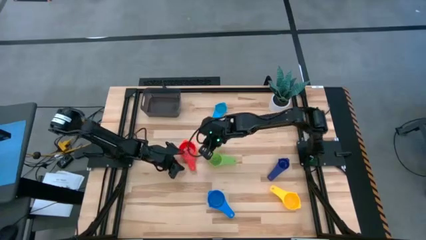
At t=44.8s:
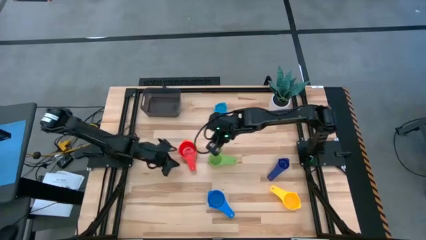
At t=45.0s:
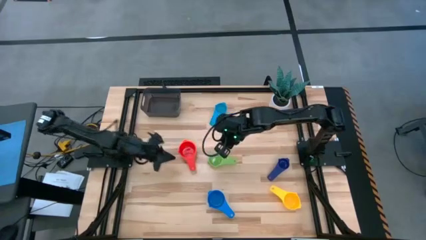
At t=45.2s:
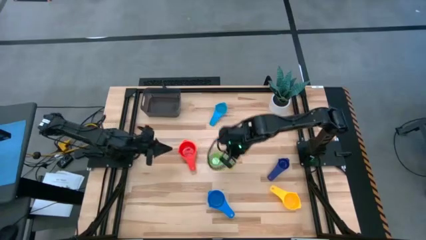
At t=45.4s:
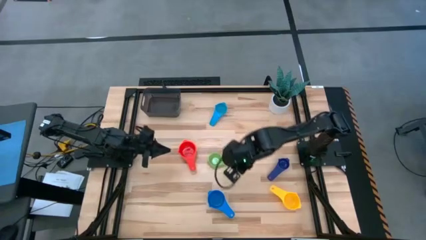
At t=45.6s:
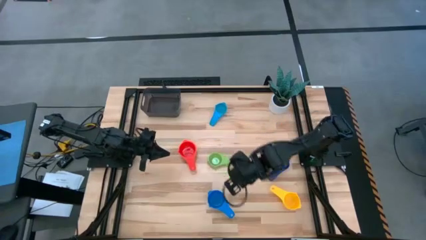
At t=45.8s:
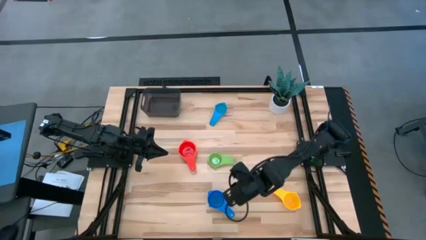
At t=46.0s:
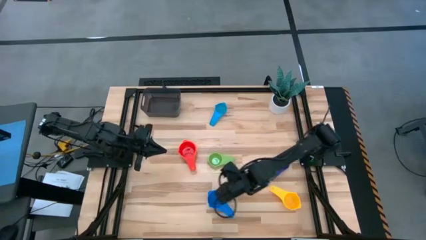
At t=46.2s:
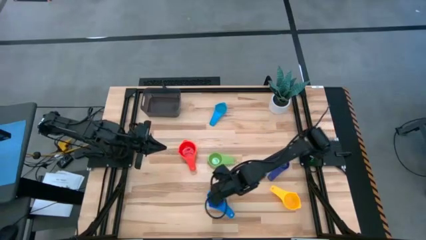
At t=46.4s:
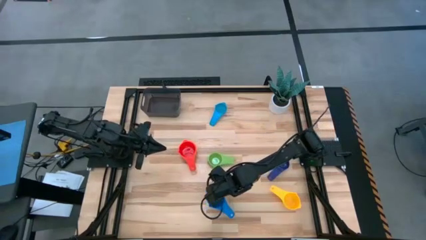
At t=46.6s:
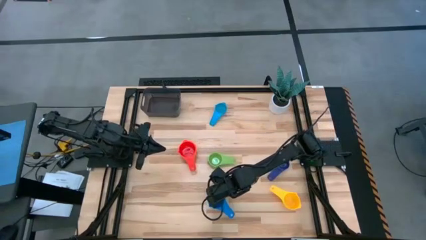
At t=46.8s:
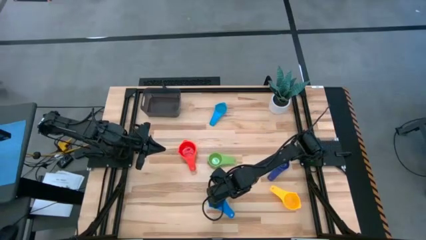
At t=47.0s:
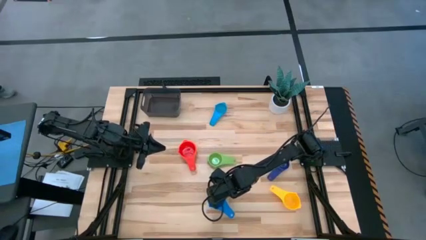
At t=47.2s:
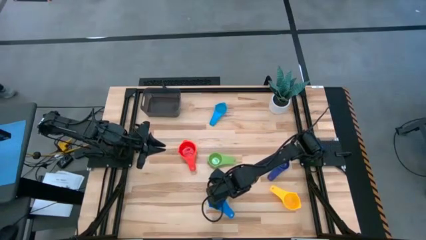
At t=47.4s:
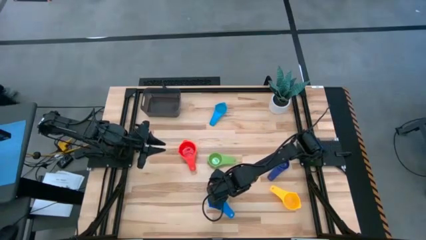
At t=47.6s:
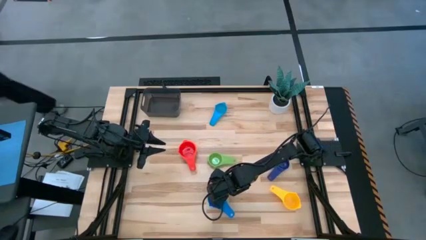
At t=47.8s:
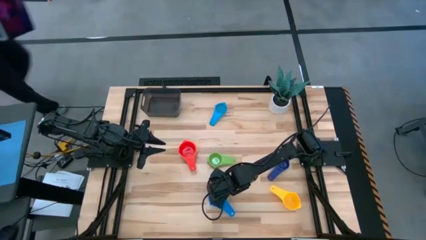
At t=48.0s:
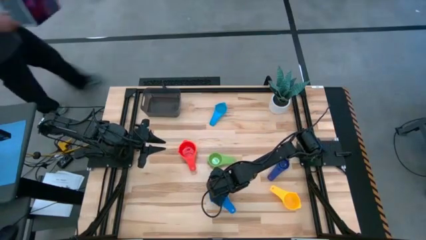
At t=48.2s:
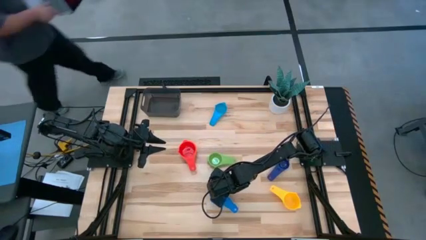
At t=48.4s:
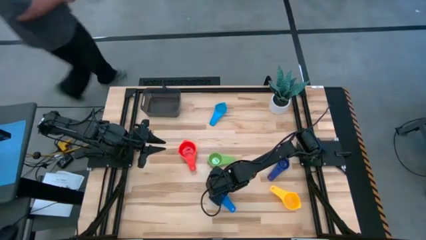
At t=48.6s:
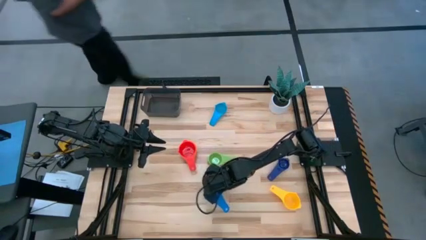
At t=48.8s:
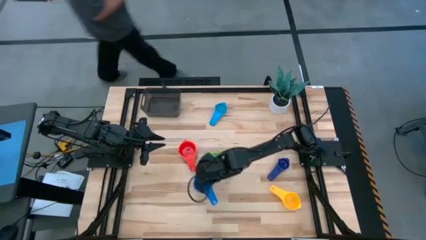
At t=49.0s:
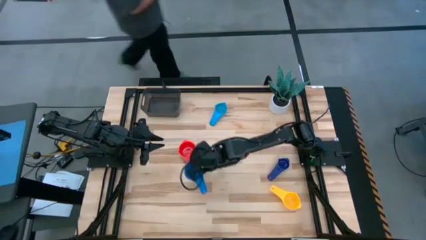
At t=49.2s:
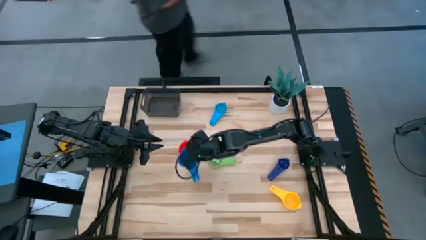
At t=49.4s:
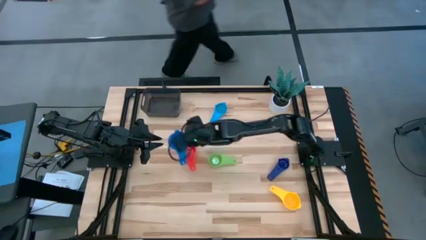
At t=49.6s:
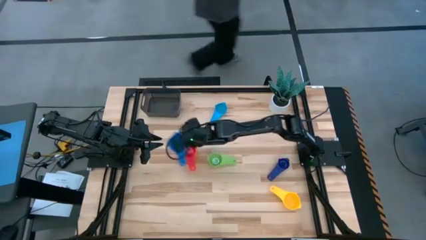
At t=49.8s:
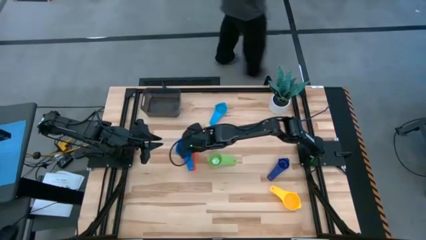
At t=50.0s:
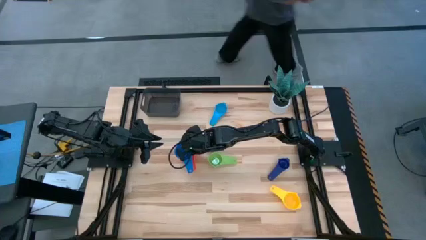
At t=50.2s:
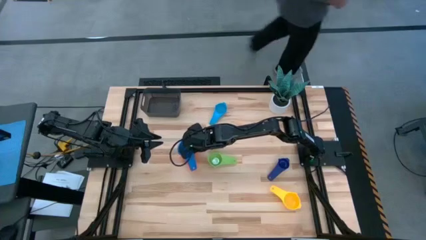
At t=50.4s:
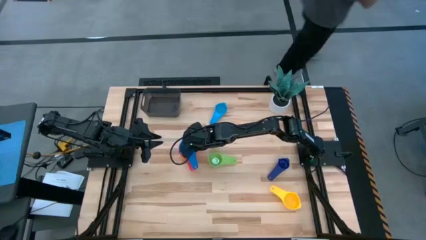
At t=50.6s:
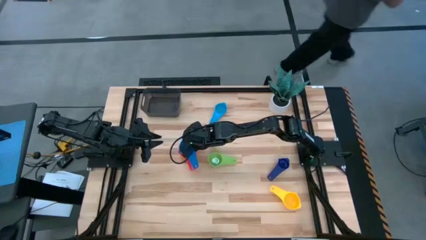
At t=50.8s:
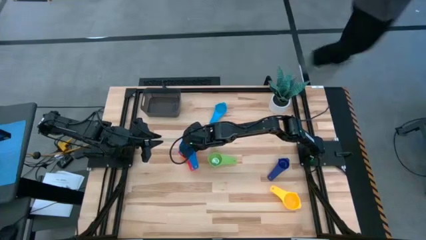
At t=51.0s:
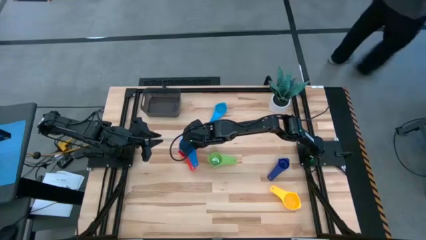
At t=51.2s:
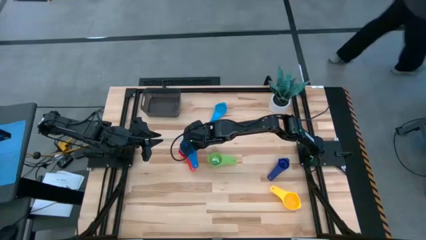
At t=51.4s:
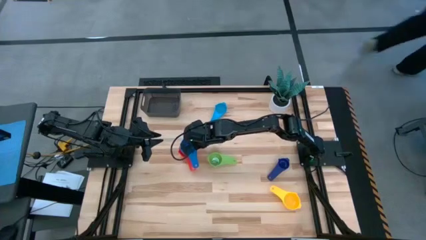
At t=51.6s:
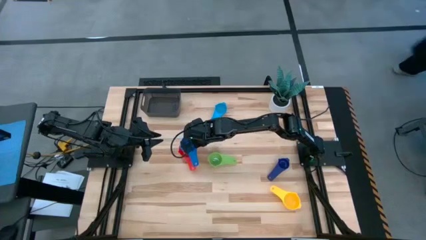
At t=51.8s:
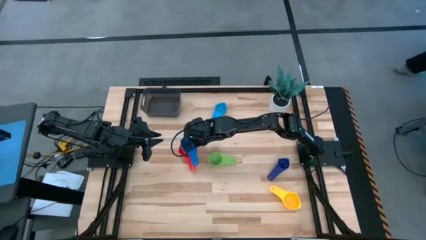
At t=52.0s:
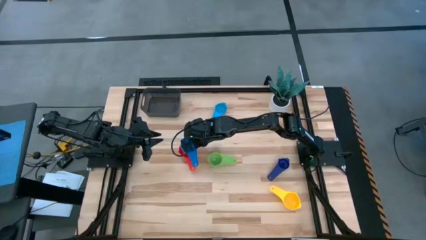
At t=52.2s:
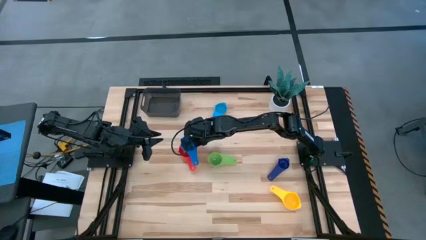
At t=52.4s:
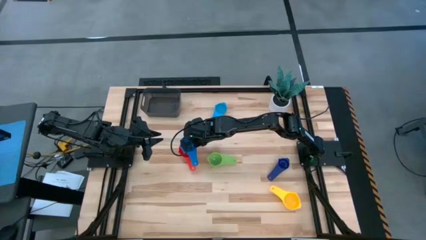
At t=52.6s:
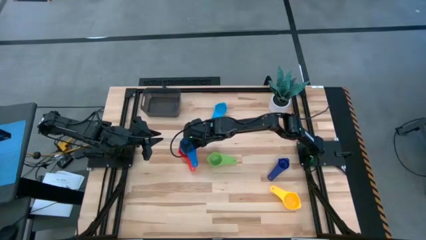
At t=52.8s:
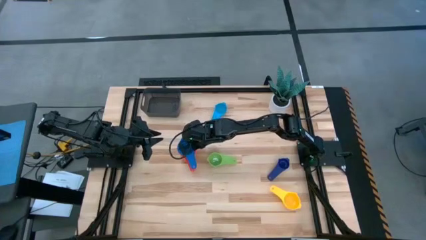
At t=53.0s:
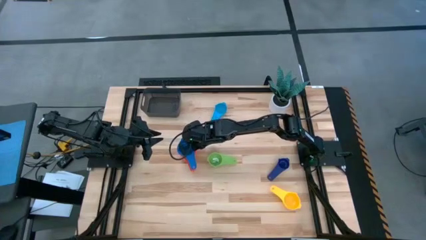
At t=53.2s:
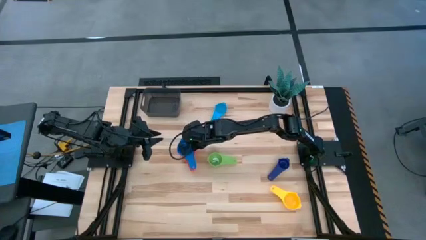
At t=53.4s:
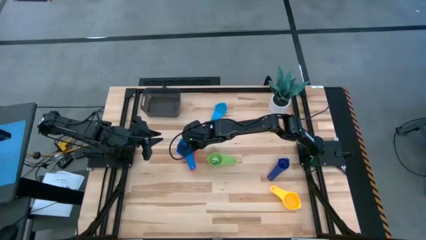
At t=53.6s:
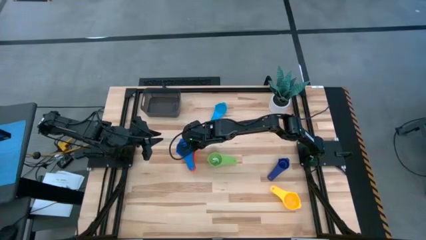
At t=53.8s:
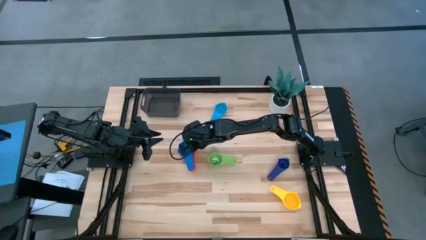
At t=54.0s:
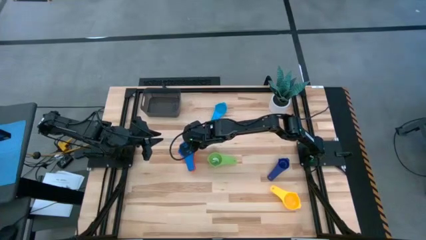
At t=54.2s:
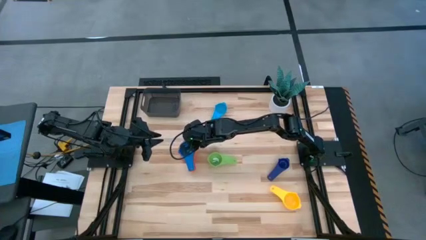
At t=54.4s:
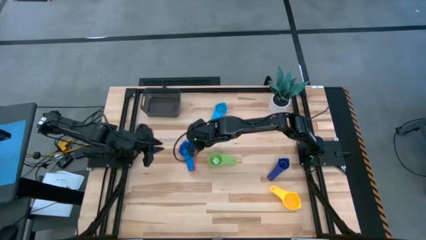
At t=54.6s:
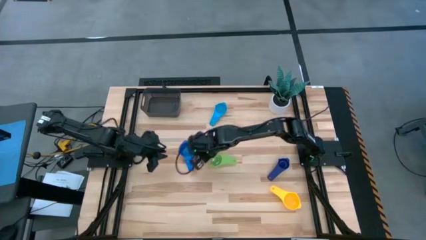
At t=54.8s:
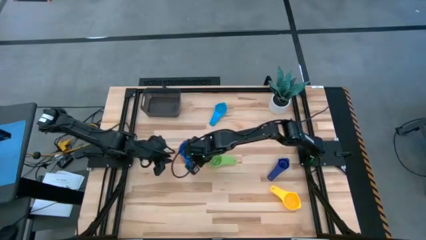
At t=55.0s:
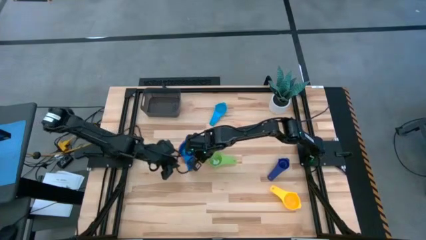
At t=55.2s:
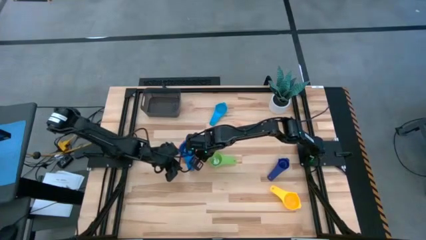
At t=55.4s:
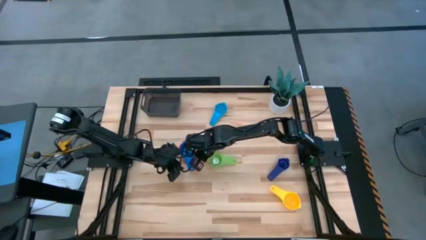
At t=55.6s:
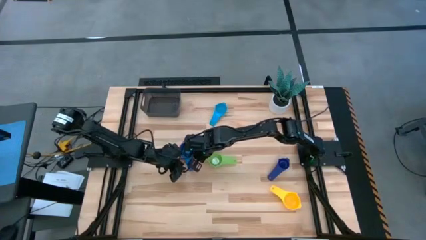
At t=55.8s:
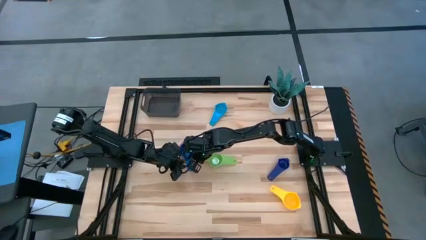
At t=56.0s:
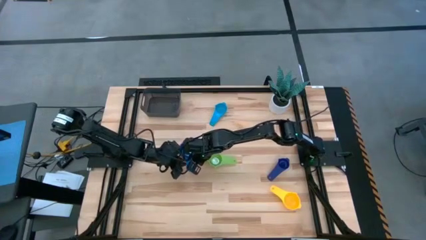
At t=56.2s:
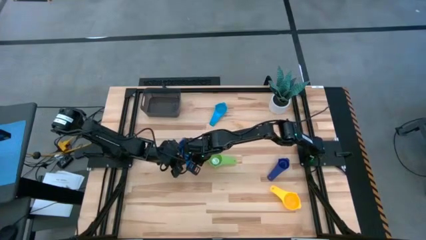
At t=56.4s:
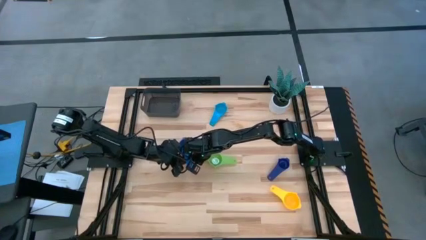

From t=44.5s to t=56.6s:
Task: Nest measuring cups in basket
Stack the blue measuring cup on top of the red measuring cup
